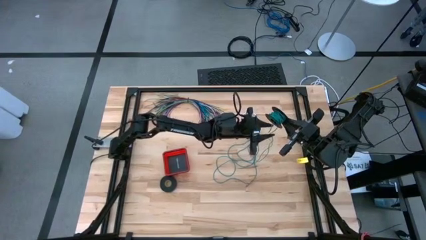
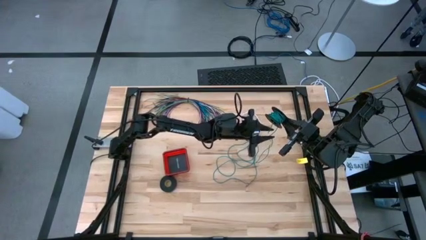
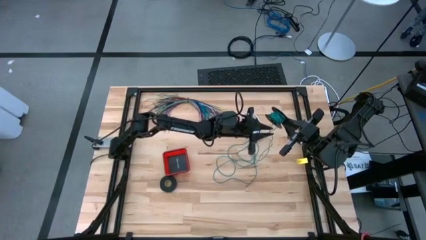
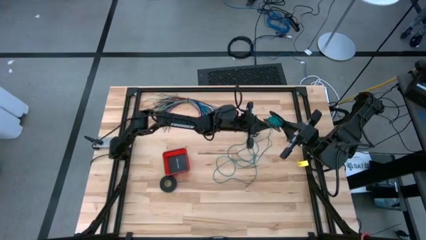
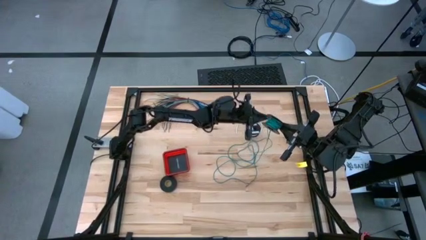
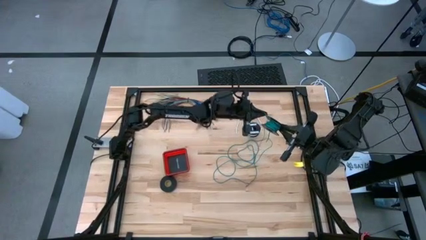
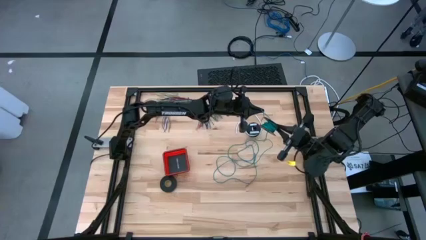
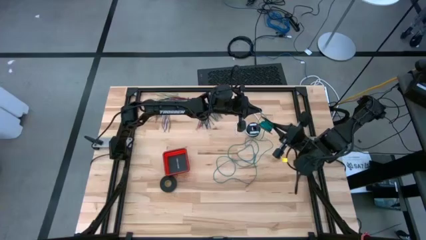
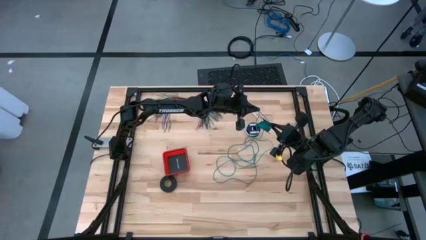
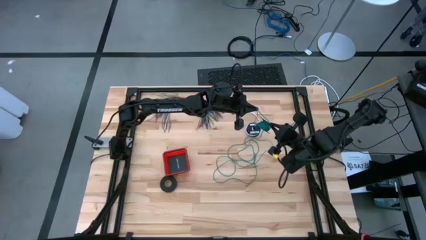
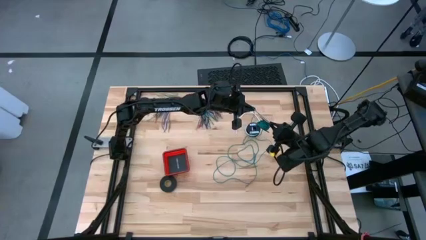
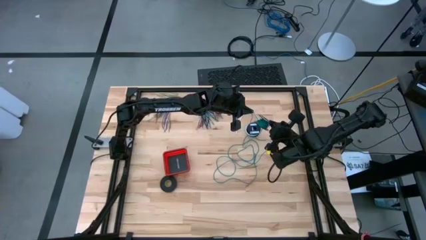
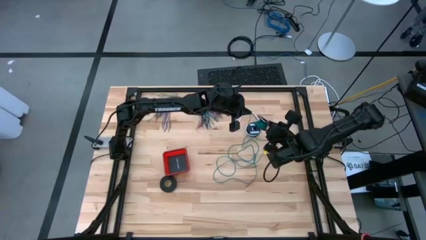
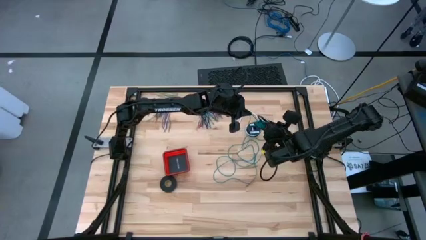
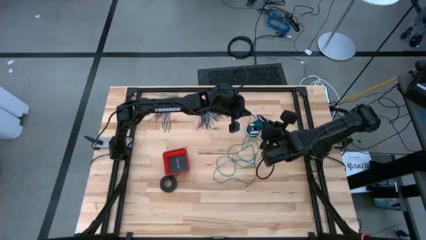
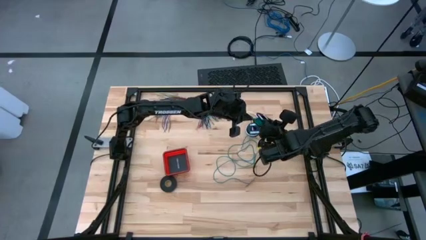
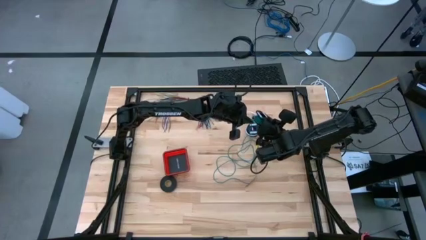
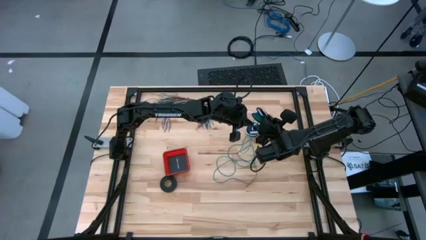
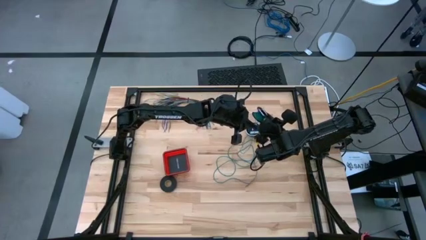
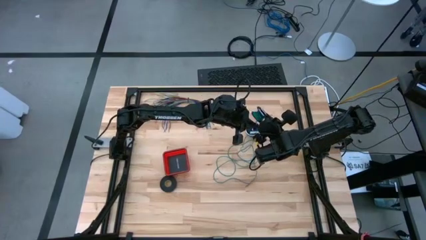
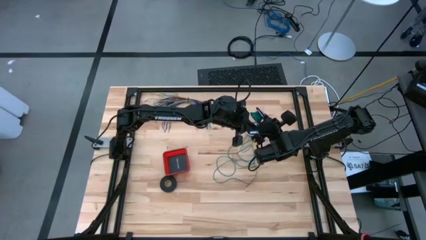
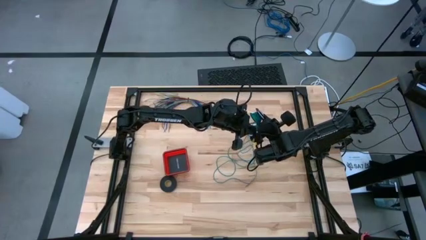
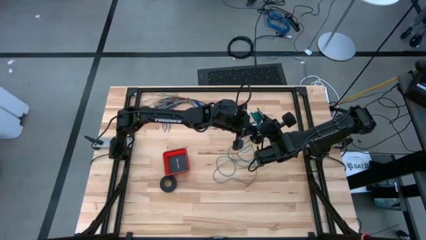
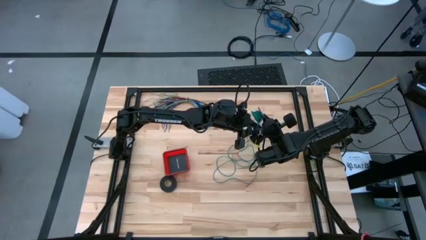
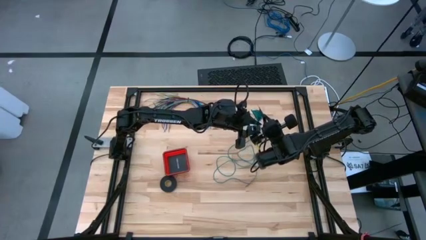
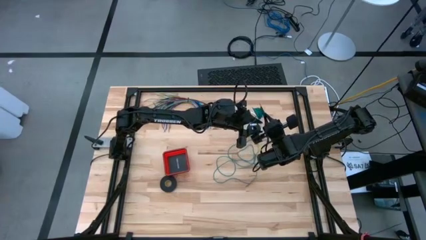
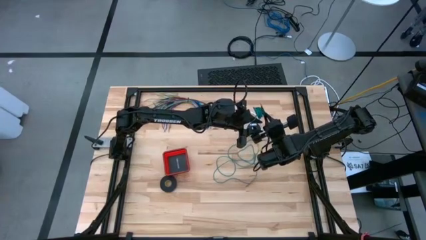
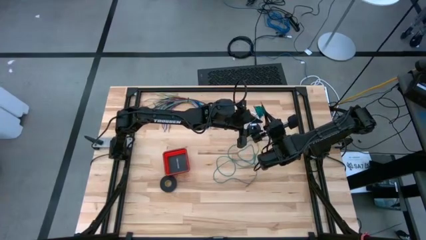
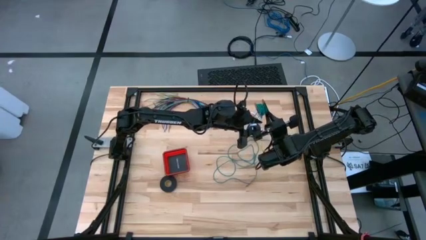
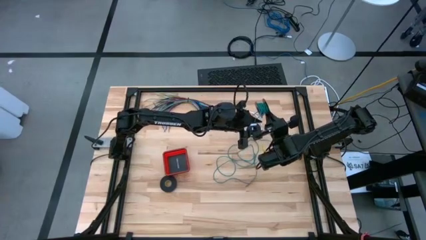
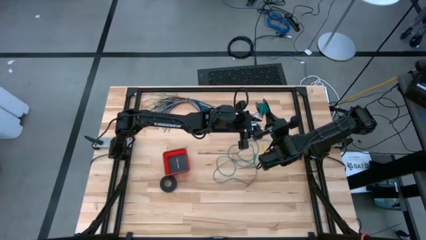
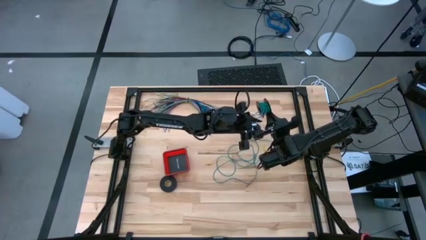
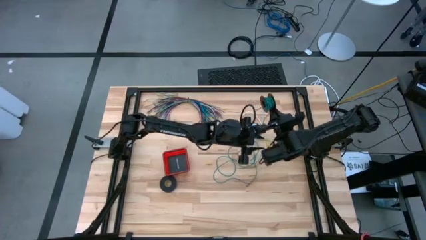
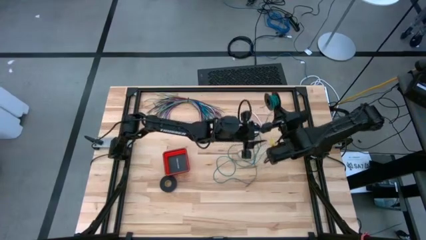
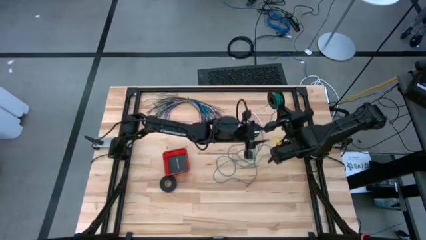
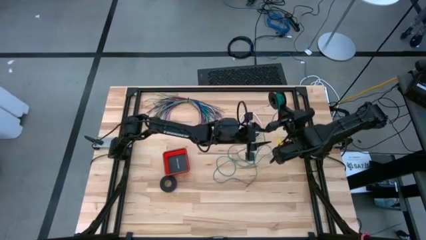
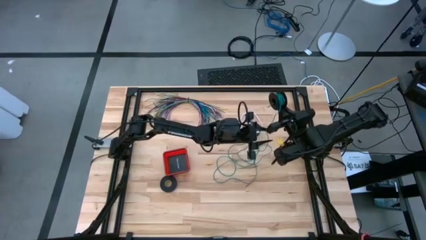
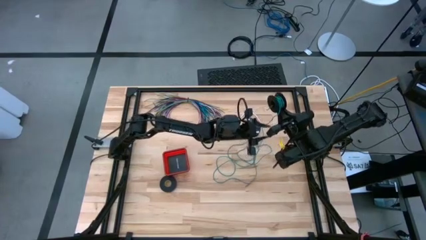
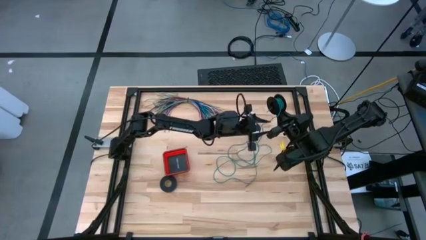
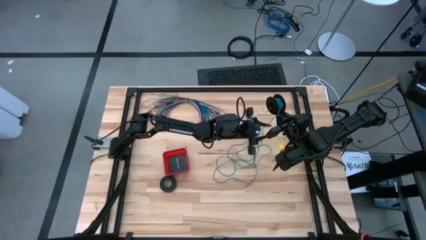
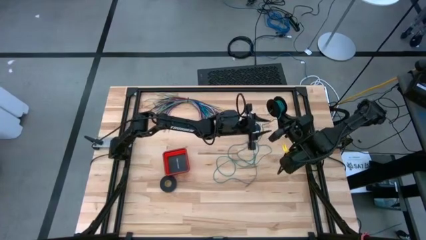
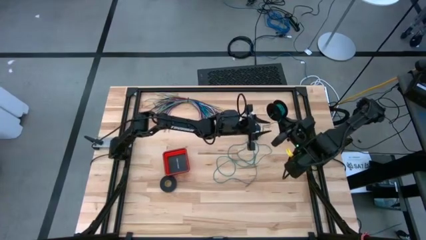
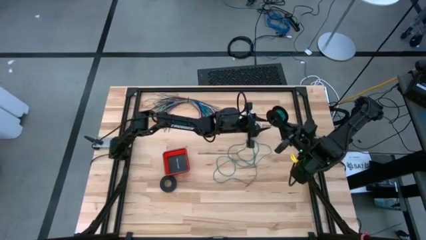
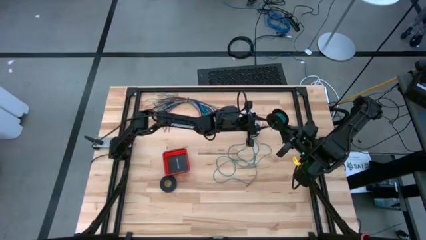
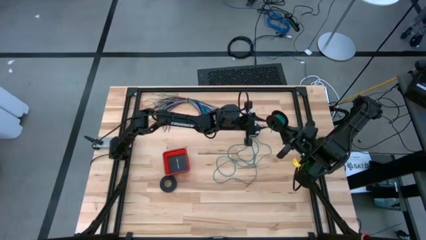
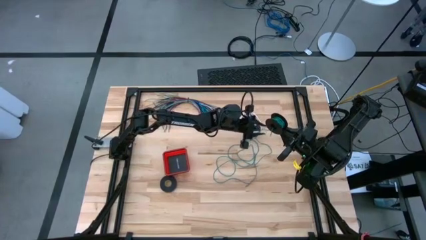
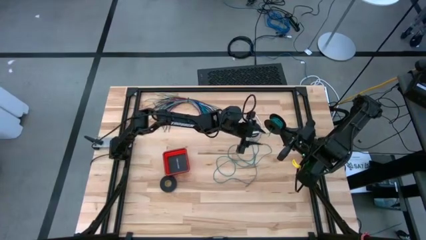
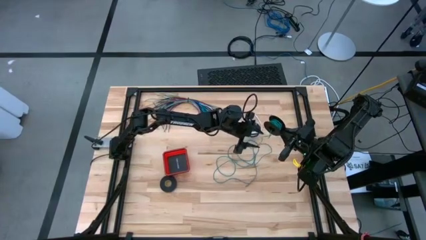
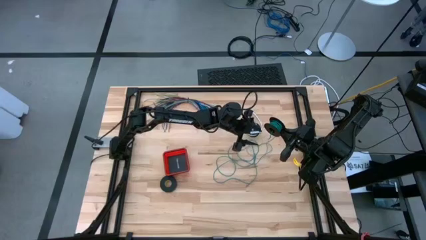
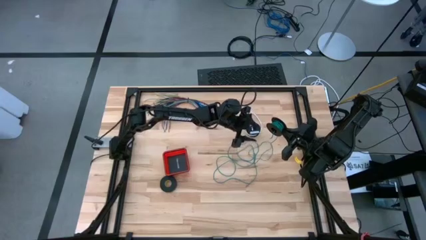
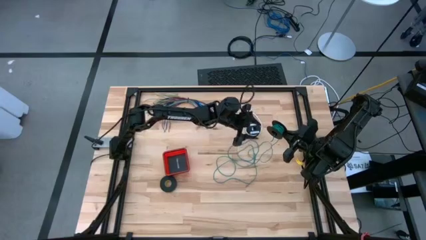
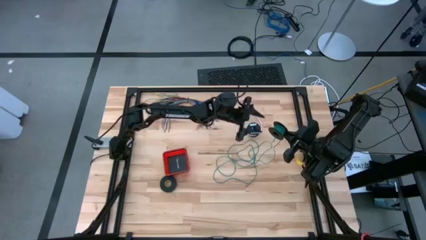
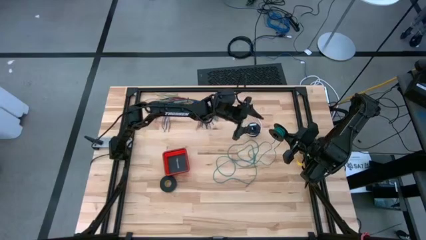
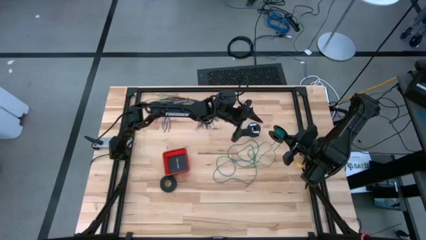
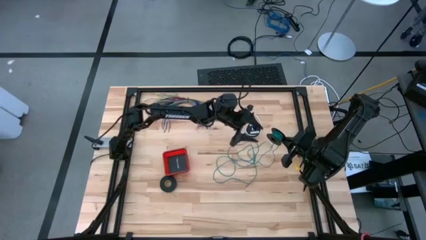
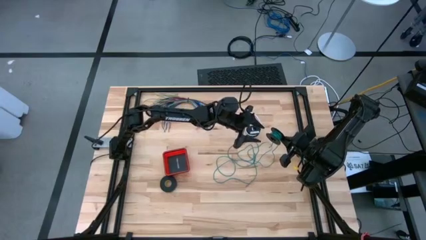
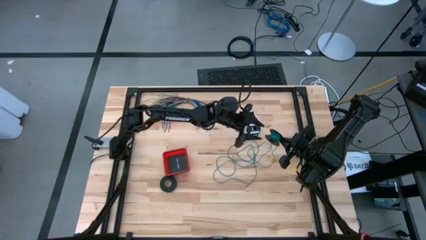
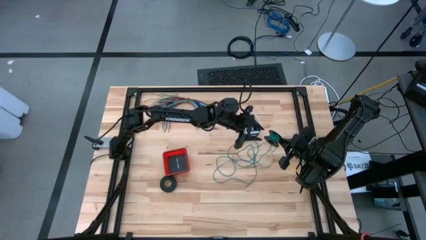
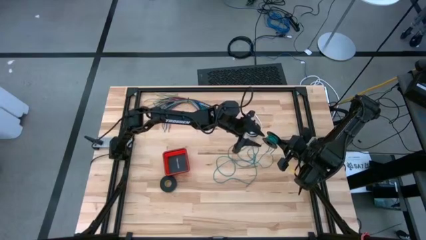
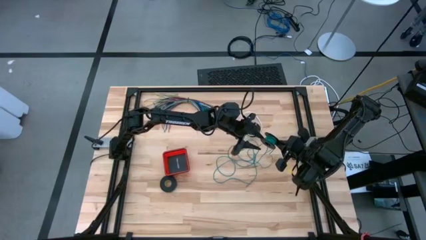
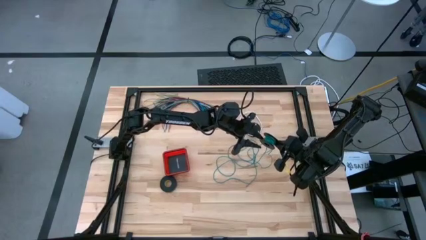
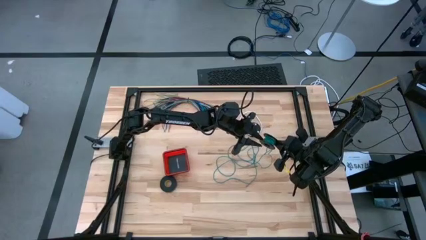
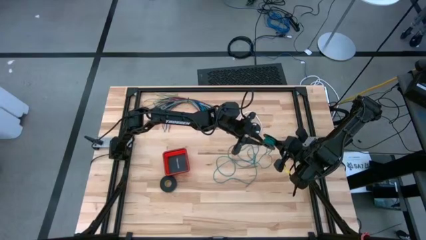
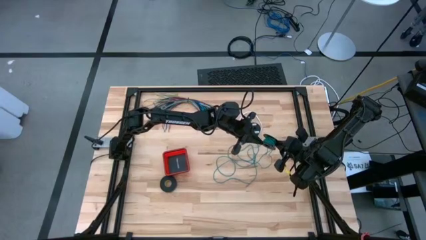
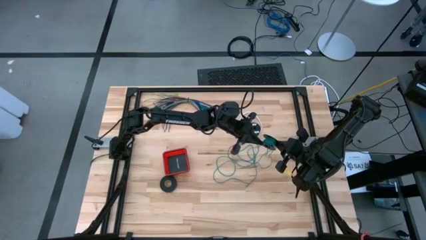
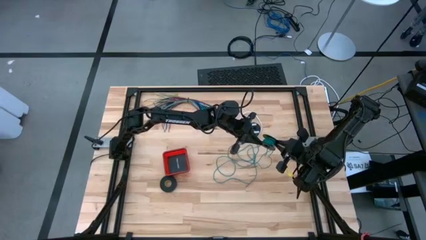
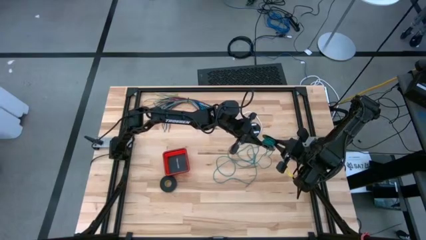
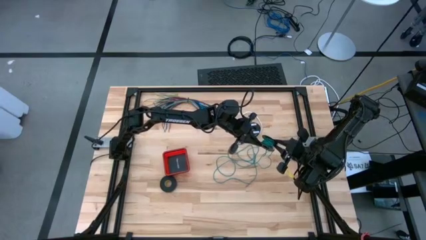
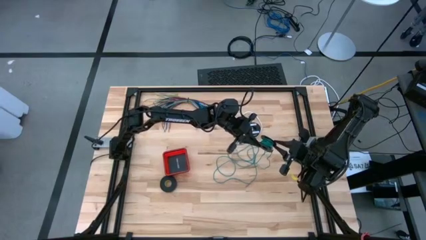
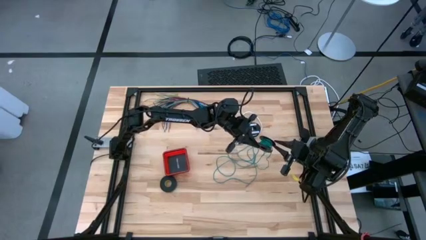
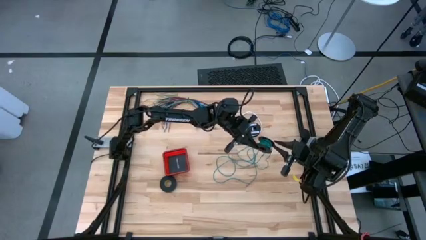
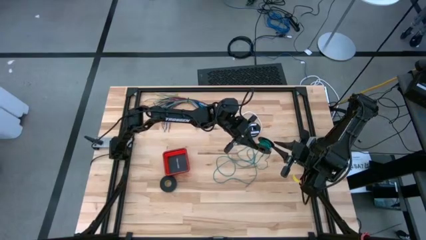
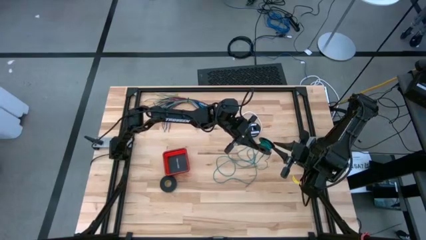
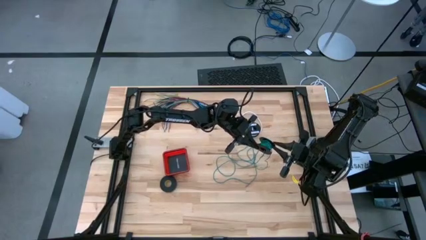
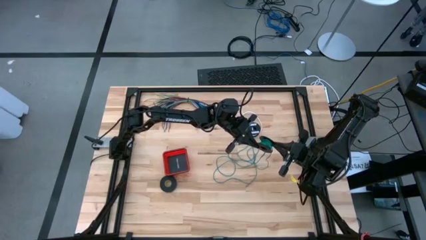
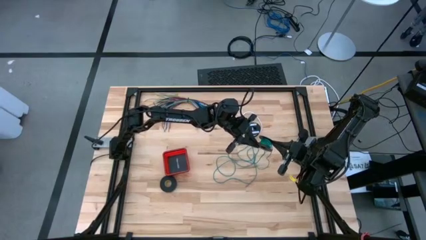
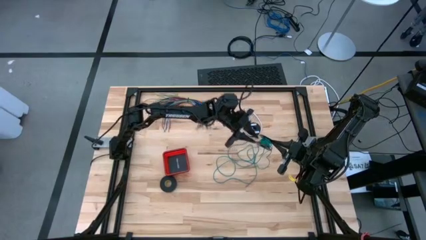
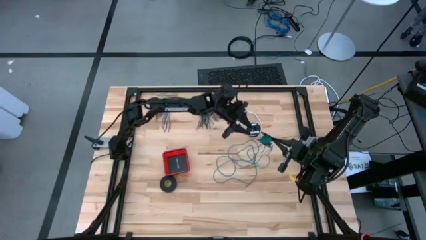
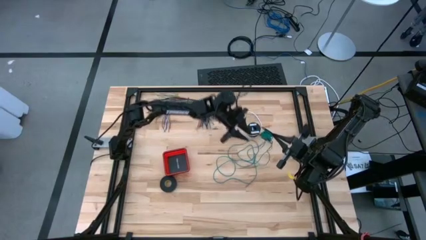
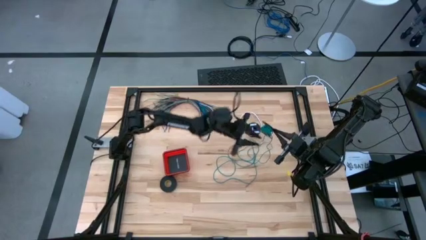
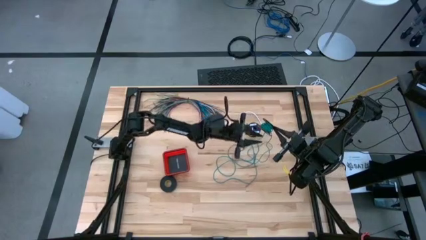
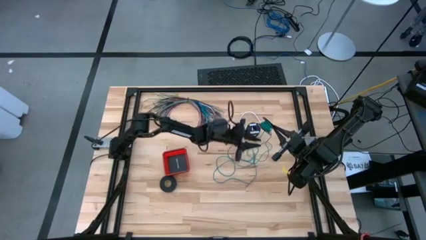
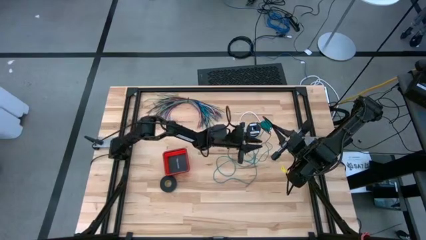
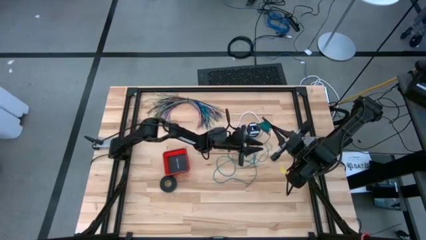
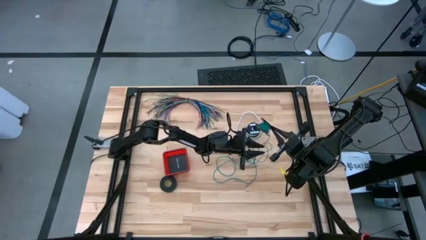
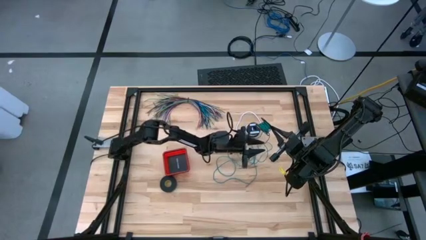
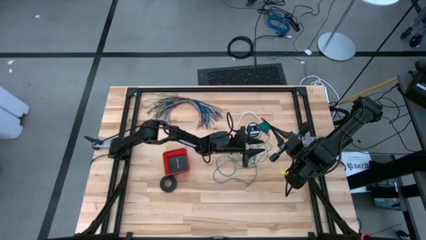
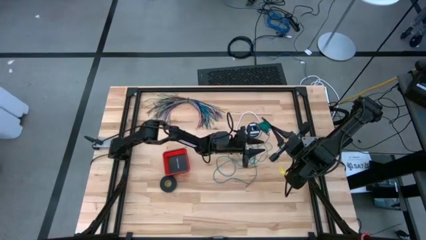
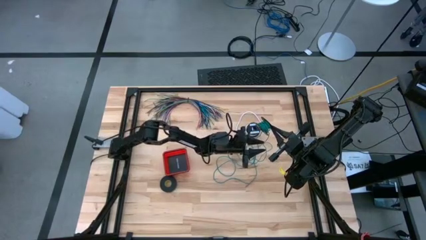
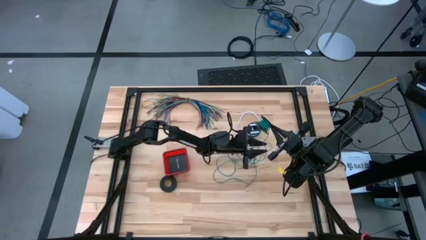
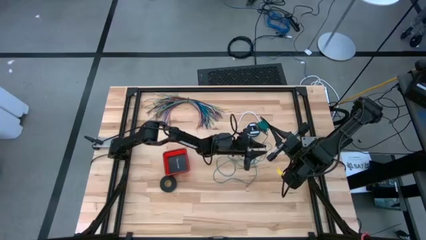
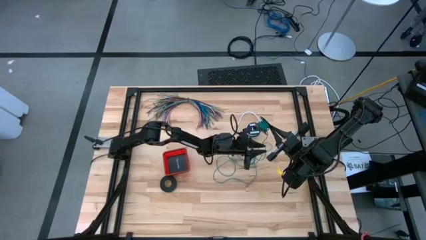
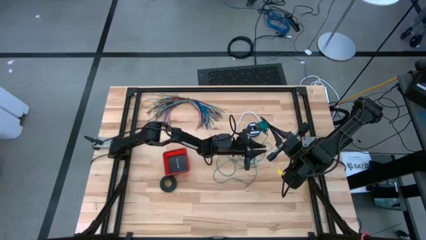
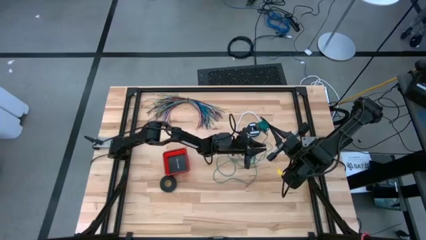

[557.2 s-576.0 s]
Task: Coil cords
Coil the green wire onto the spool
